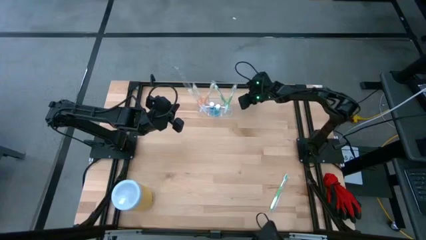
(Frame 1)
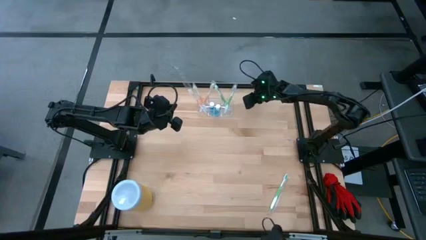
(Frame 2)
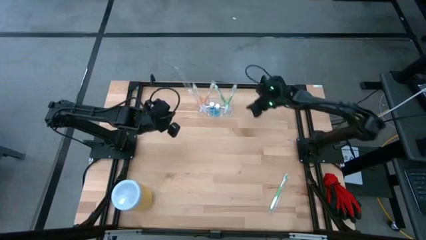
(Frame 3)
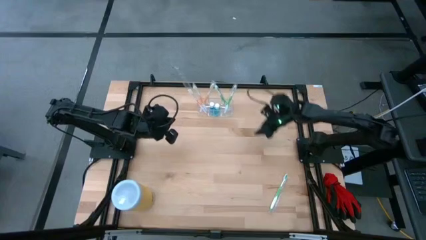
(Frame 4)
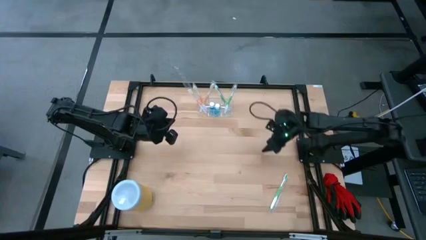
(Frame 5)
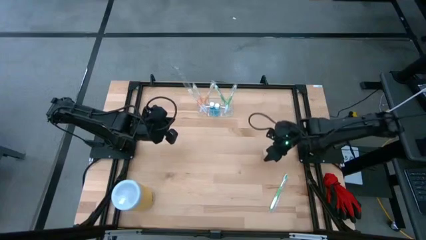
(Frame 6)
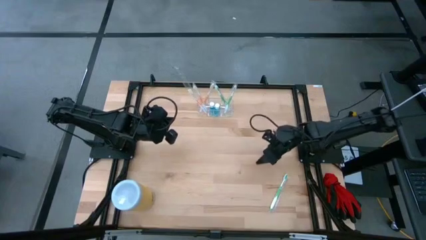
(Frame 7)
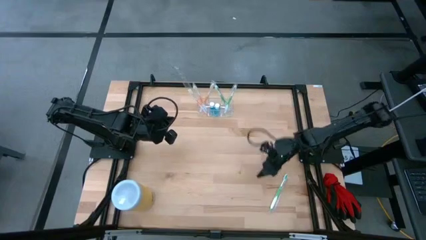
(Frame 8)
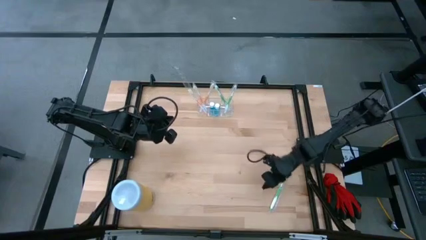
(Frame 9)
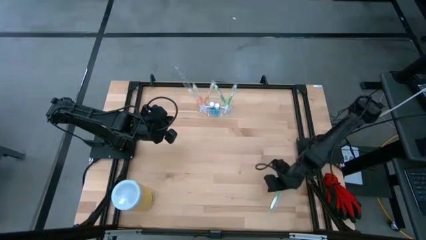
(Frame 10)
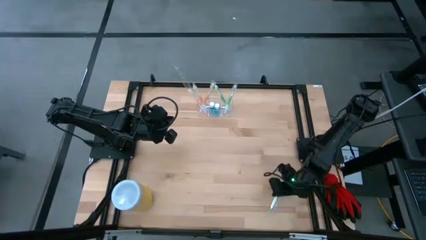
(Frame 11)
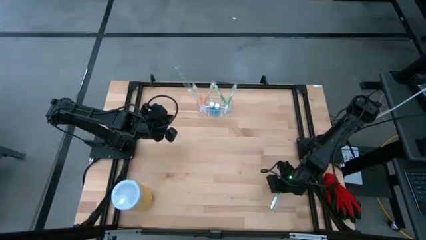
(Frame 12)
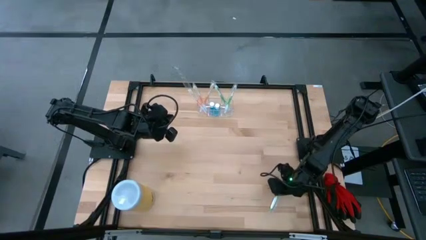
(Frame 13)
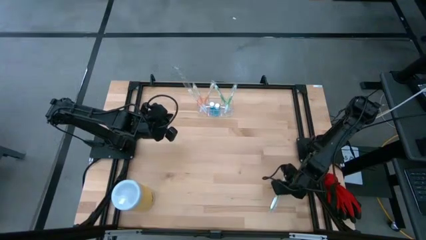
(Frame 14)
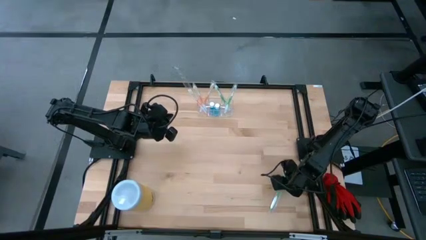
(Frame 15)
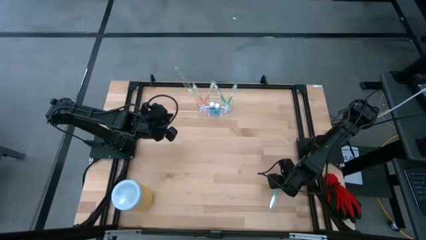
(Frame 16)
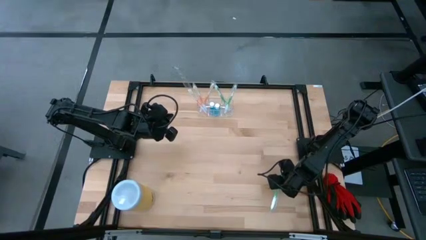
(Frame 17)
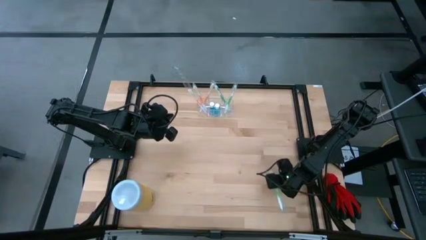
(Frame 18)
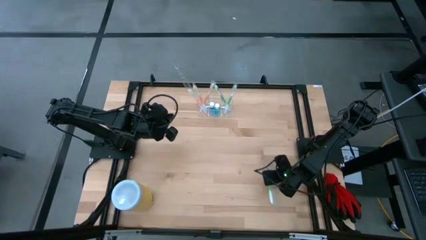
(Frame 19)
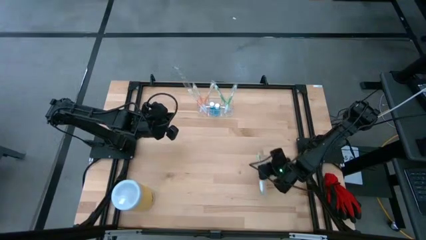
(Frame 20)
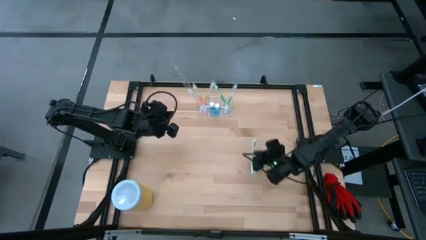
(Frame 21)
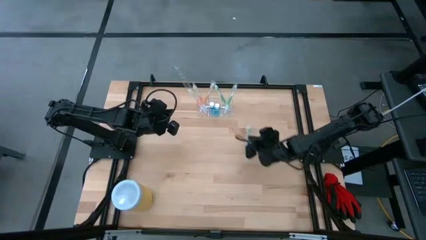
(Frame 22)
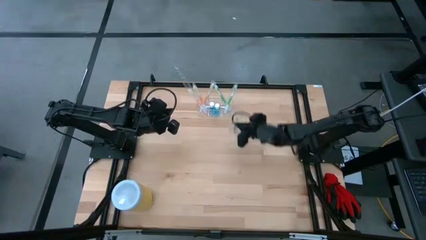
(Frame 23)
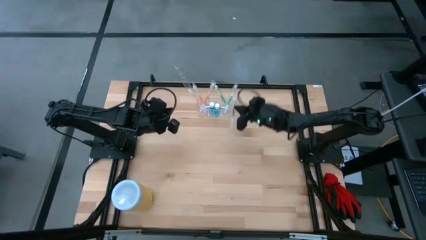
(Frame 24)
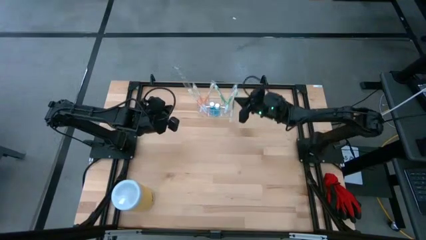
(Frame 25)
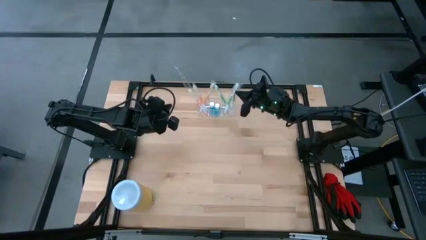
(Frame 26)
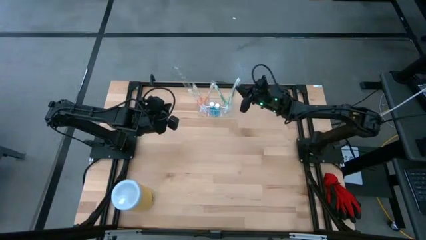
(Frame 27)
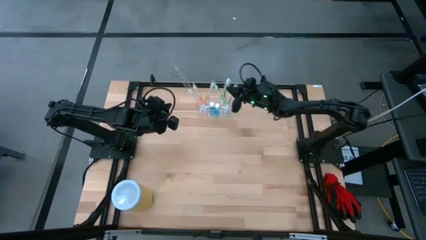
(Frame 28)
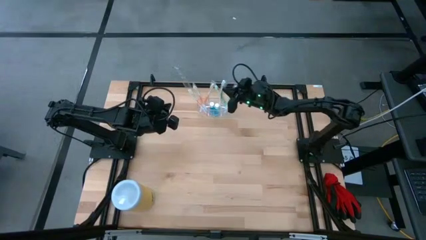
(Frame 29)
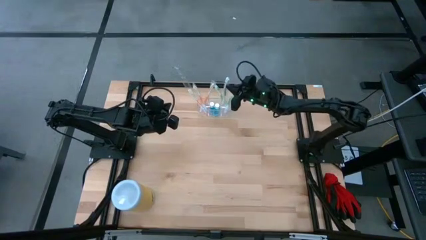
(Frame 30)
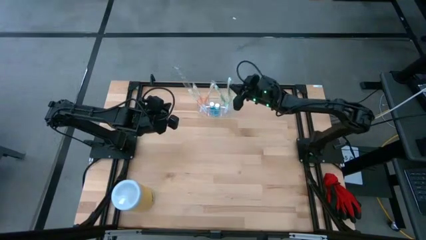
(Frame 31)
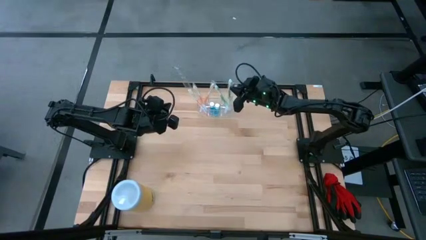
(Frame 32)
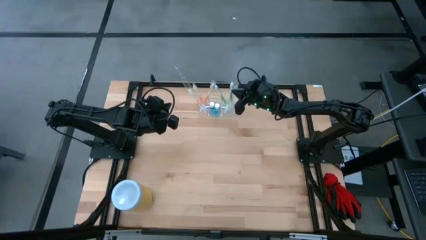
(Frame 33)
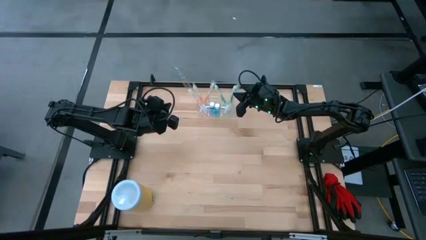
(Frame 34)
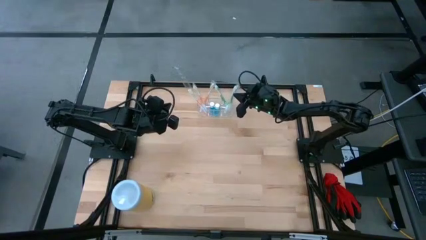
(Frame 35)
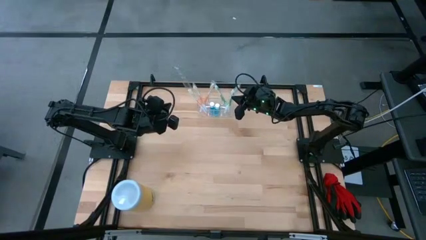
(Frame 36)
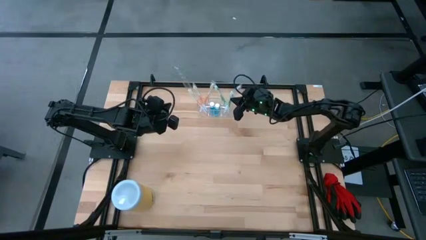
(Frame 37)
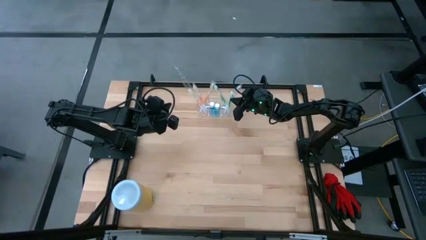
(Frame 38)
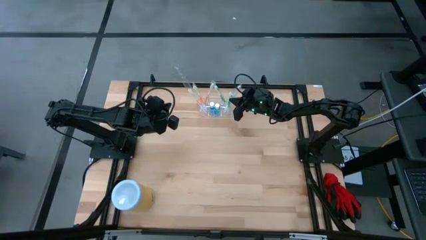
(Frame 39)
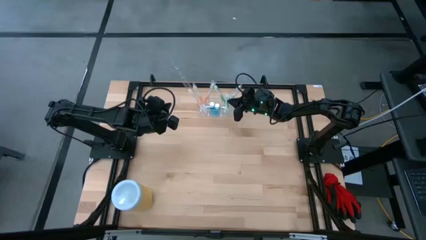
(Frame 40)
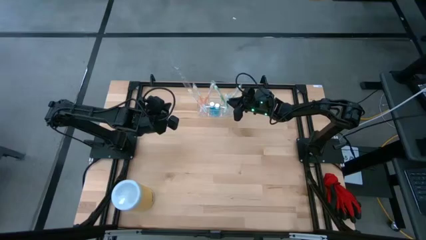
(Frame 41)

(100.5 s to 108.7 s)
Task: Pick & Place toothbrushing station
Put the green toothbrush into the transparent organizer

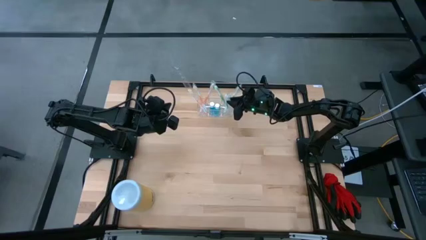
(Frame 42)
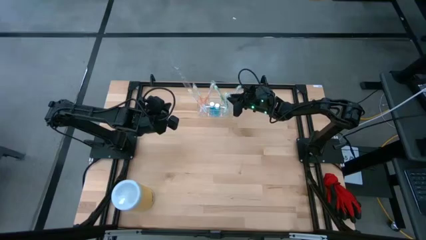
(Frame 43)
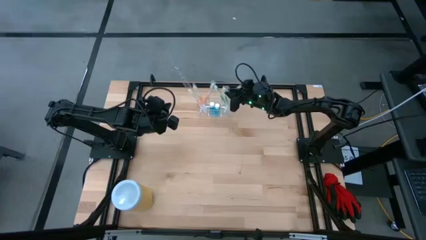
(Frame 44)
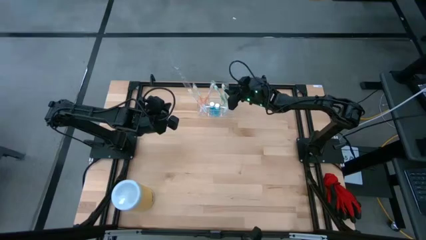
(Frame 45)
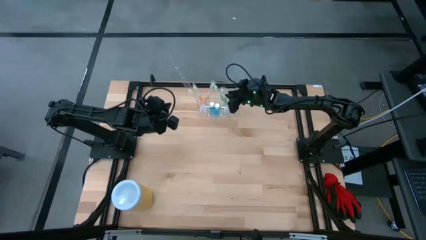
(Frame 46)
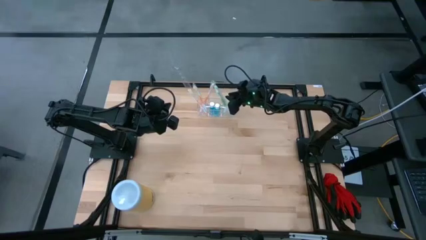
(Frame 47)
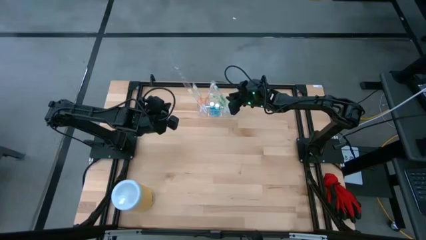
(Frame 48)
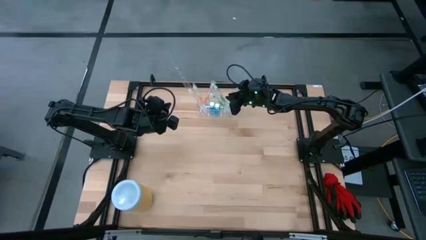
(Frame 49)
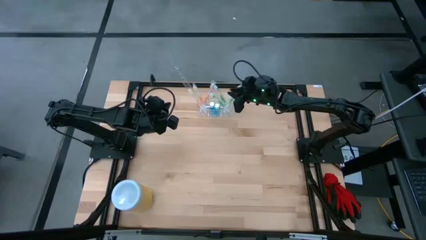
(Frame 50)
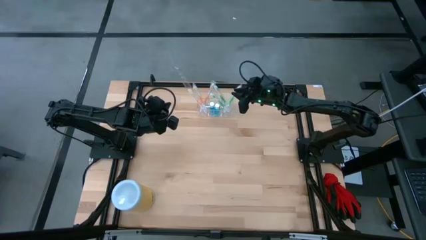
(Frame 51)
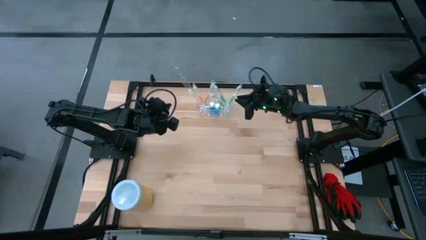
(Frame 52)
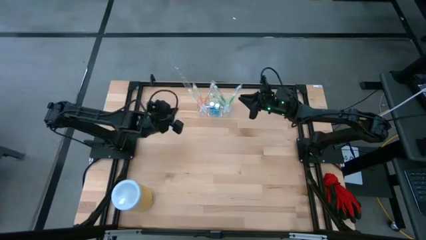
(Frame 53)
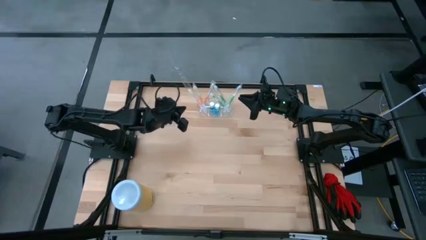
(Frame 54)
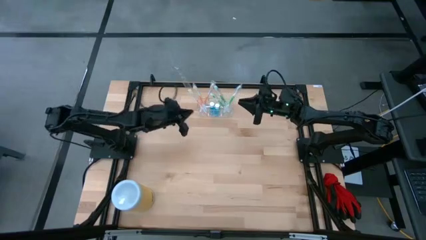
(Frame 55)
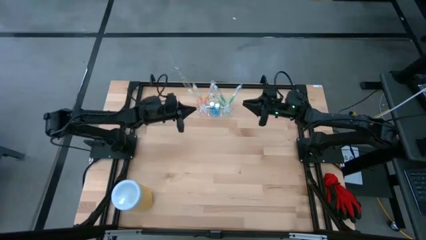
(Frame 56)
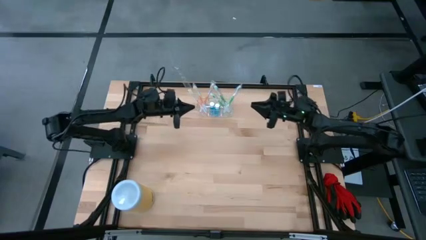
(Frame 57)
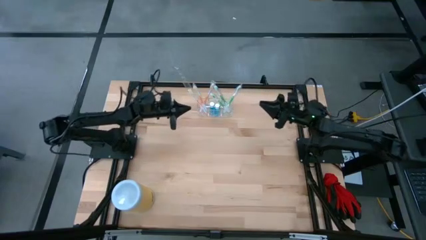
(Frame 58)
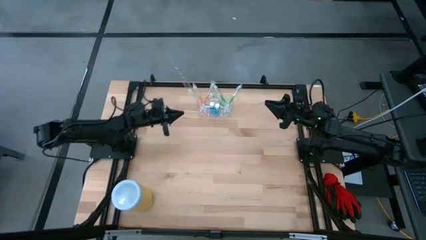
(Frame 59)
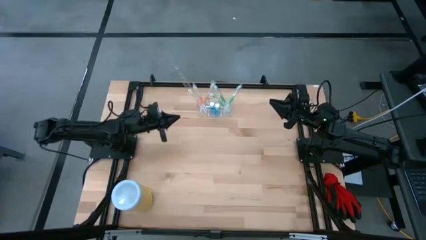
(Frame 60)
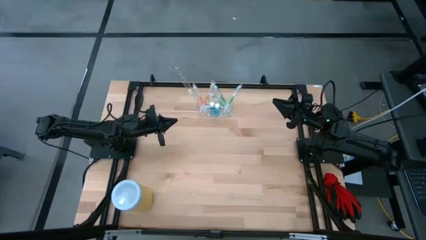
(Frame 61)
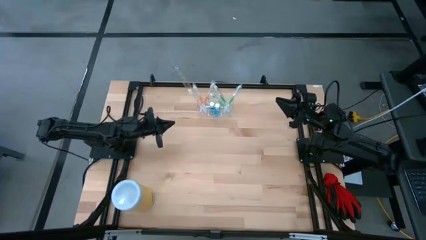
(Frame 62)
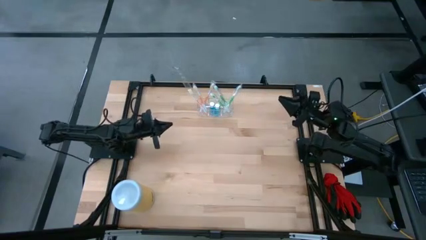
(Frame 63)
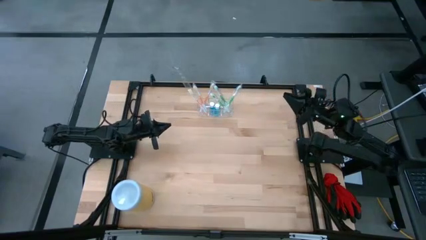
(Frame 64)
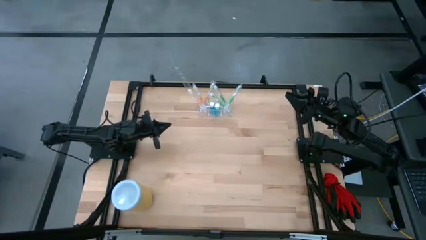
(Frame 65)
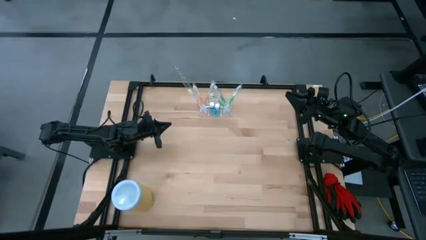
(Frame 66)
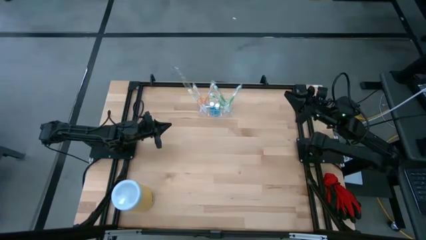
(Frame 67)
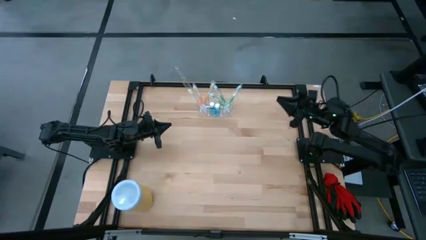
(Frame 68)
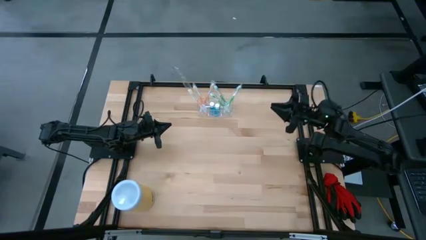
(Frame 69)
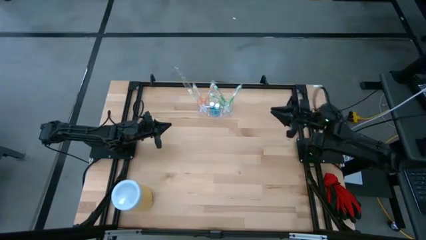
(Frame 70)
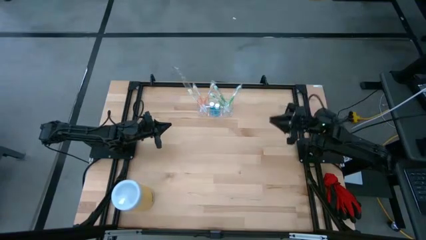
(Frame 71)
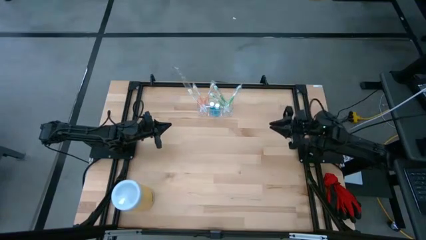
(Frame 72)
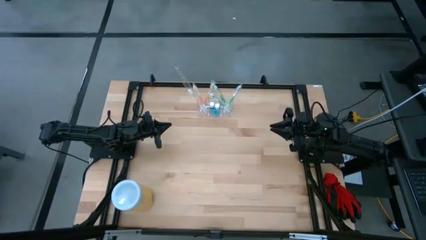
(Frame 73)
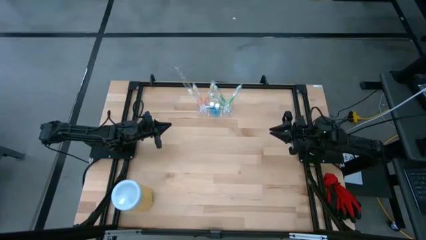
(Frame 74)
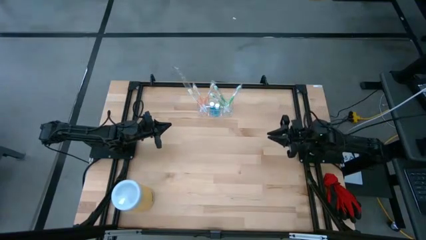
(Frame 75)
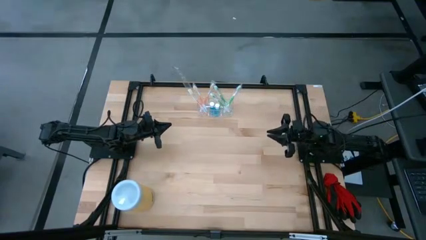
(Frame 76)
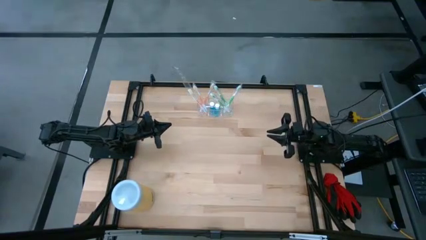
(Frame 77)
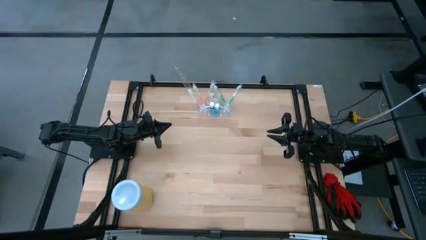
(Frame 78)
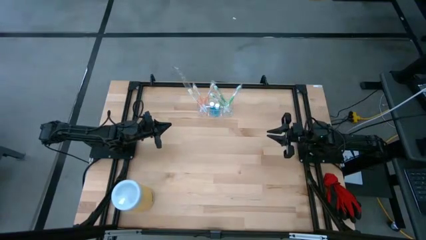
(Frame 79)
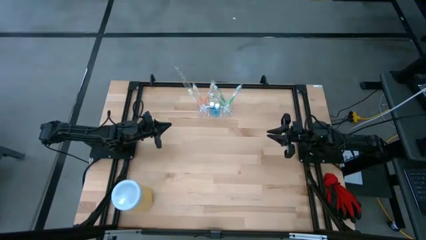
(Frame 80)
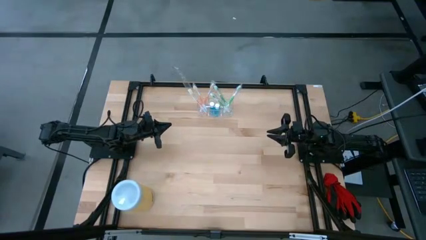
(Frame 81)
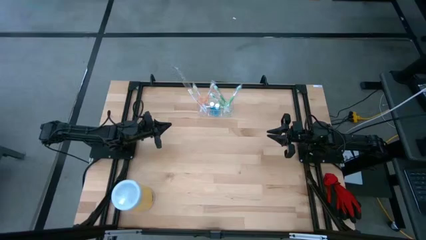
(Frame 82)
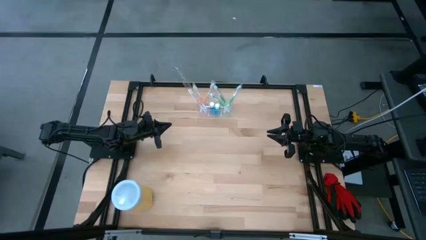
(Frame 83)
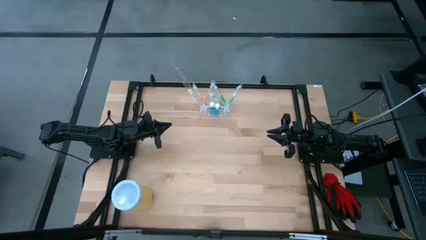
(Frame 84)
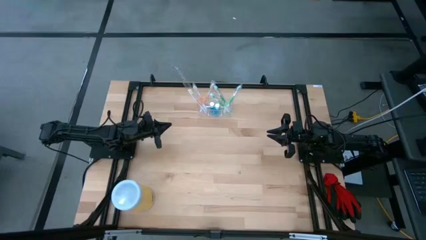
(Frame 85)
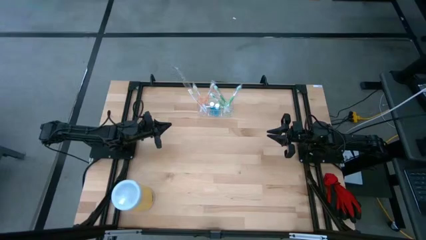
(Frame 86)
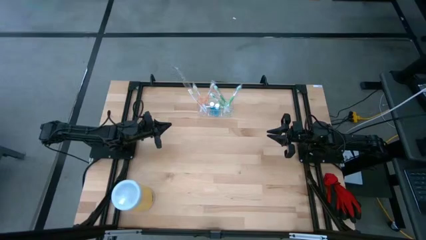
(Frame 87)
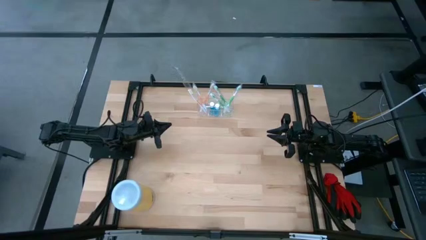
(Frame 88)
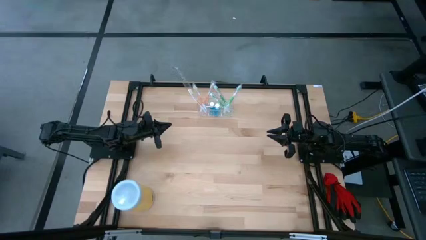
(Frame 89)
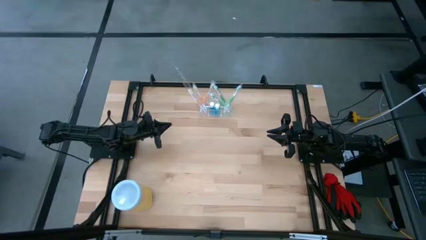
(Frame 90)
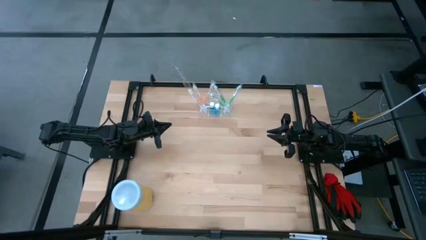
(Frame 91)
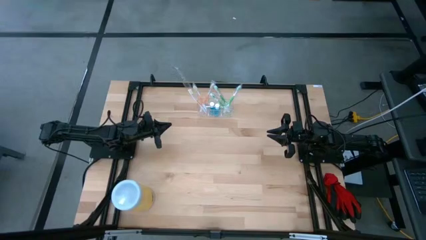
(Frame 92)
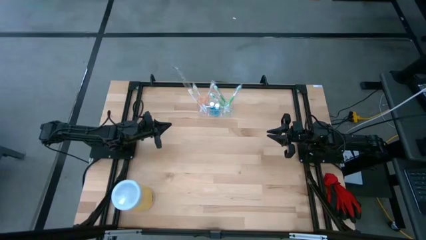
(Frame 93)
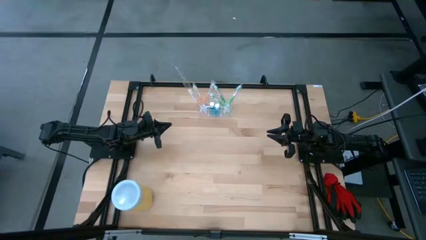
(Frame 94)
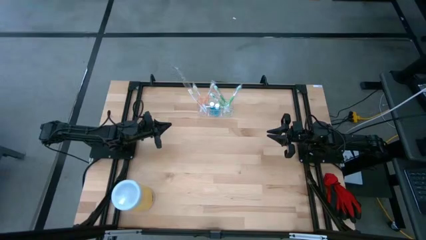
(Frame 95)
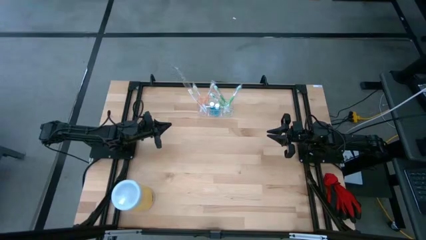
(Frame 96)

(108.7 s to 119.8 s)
Return to Home Position
